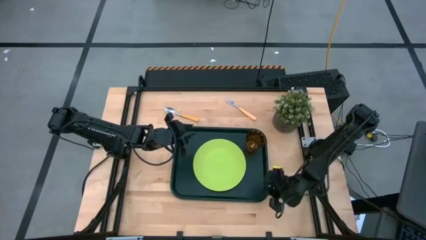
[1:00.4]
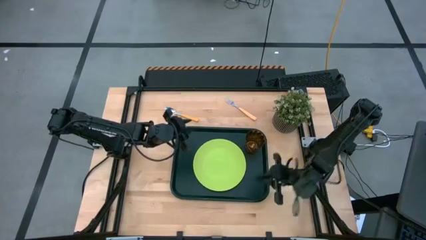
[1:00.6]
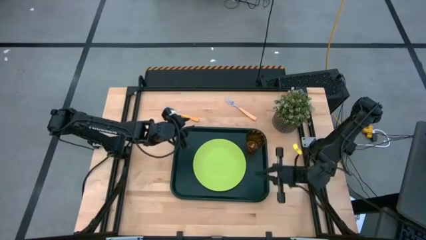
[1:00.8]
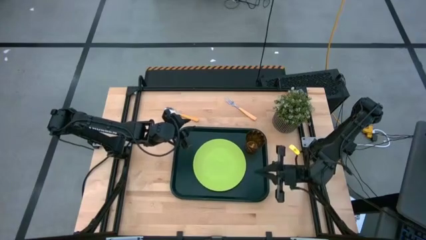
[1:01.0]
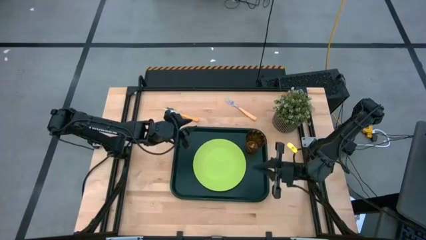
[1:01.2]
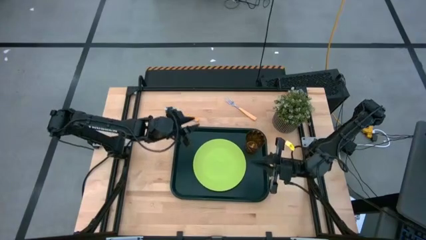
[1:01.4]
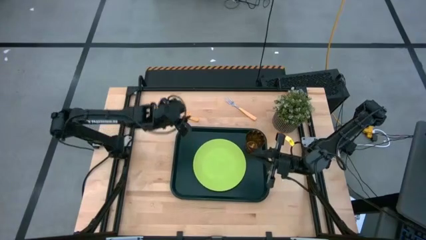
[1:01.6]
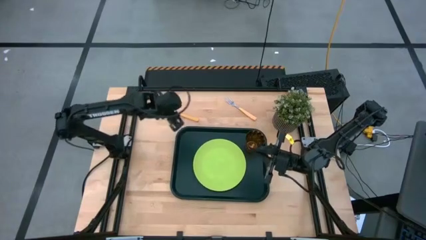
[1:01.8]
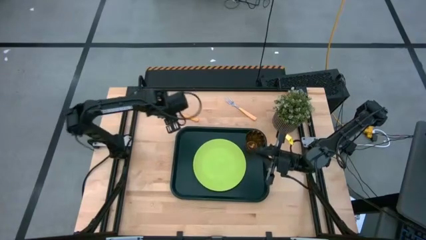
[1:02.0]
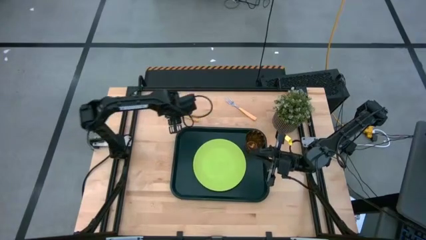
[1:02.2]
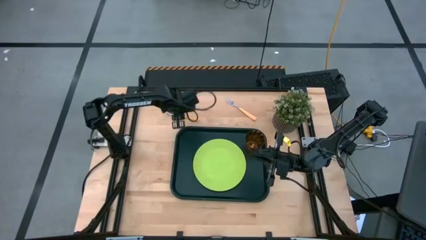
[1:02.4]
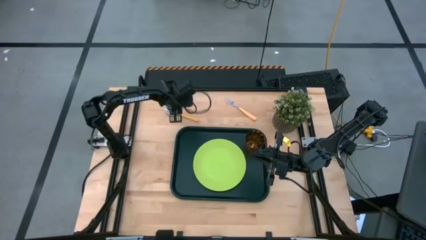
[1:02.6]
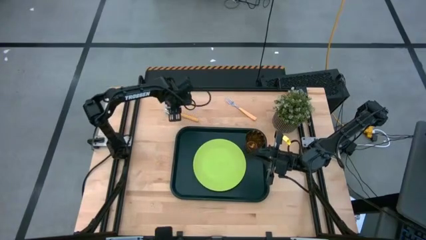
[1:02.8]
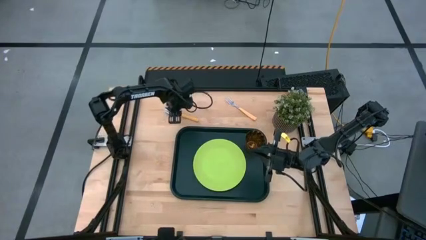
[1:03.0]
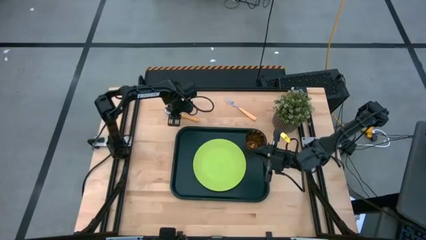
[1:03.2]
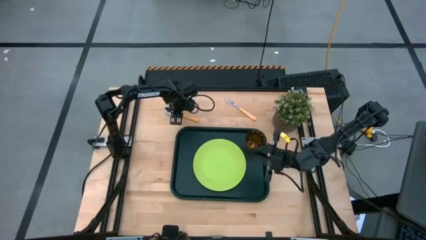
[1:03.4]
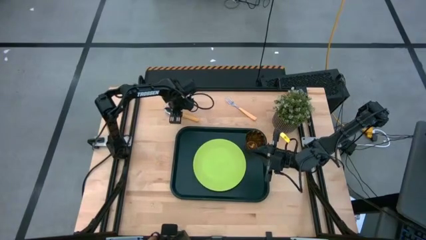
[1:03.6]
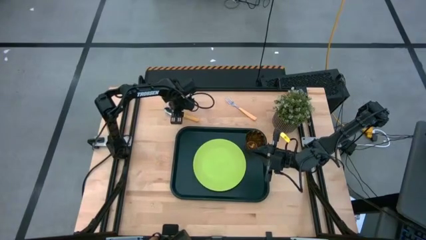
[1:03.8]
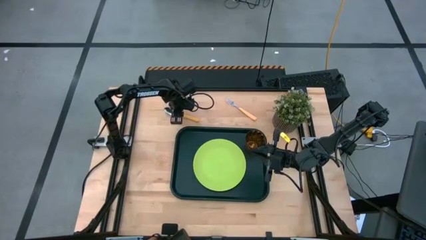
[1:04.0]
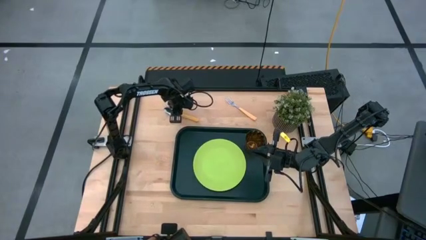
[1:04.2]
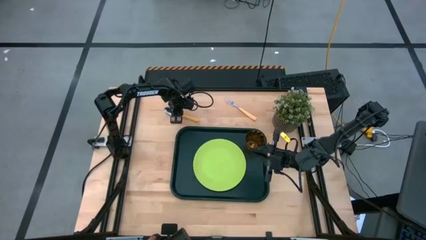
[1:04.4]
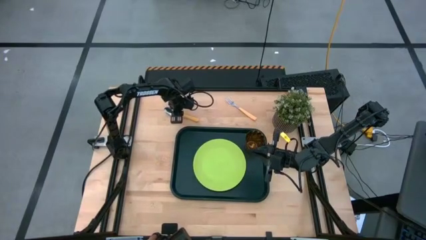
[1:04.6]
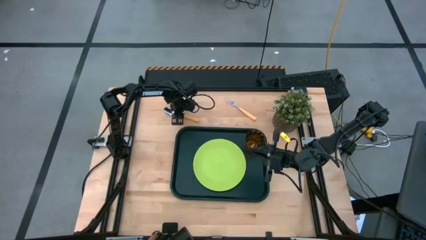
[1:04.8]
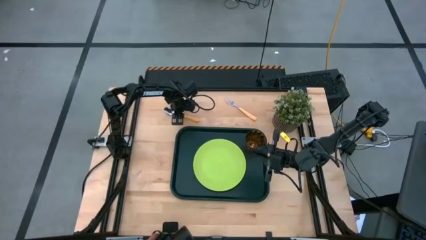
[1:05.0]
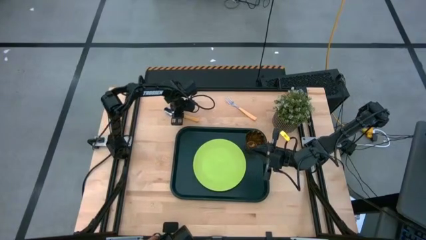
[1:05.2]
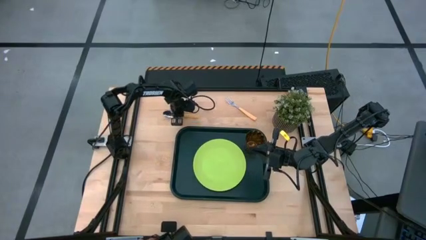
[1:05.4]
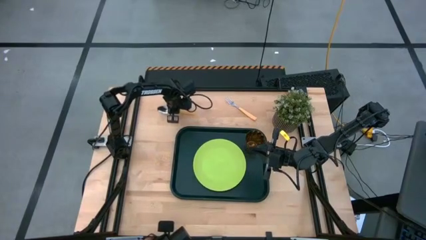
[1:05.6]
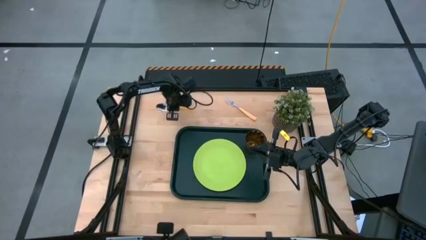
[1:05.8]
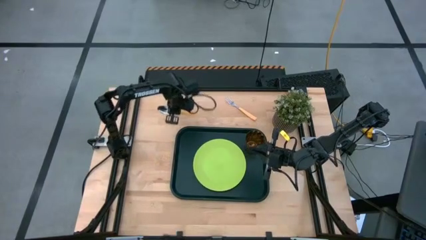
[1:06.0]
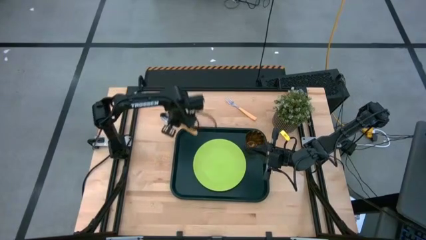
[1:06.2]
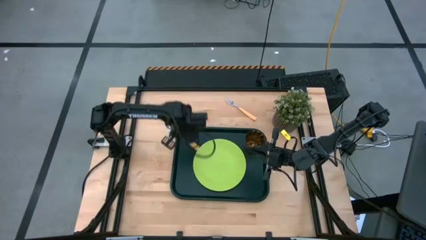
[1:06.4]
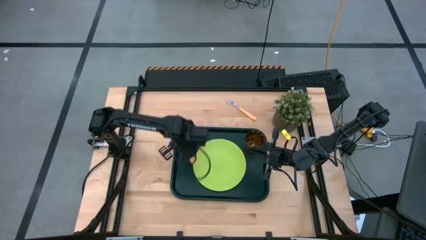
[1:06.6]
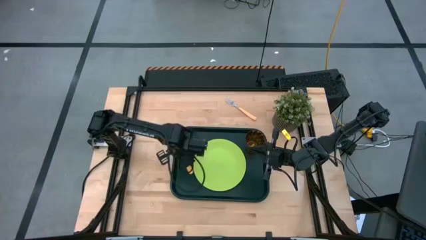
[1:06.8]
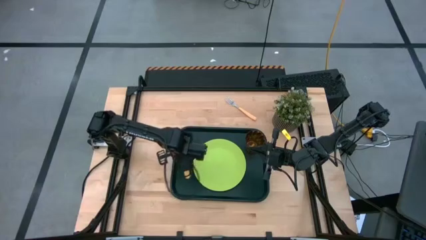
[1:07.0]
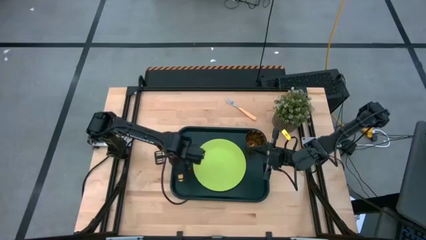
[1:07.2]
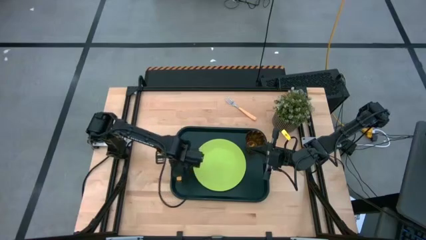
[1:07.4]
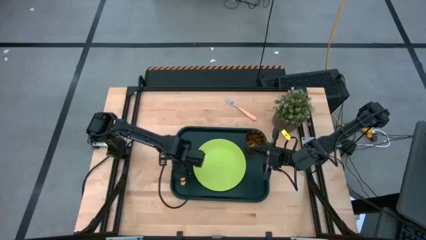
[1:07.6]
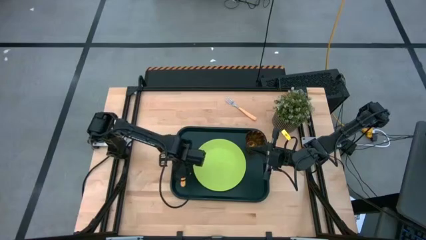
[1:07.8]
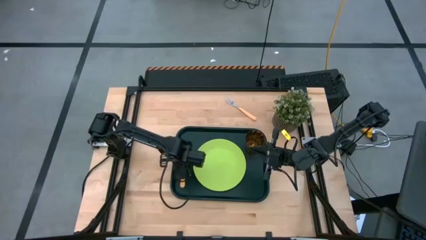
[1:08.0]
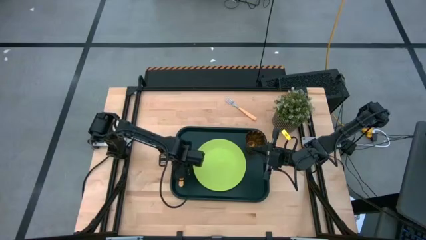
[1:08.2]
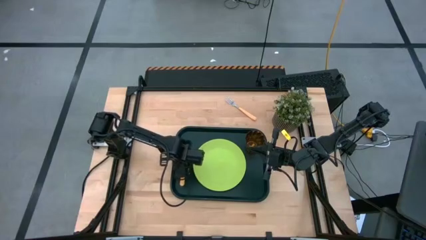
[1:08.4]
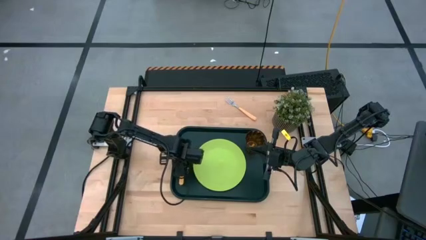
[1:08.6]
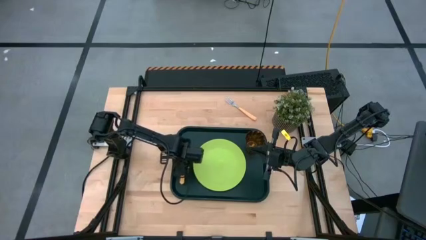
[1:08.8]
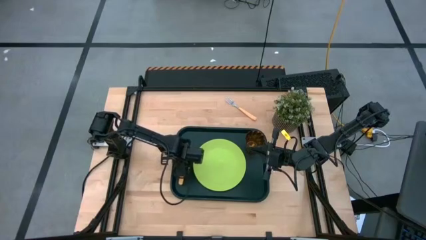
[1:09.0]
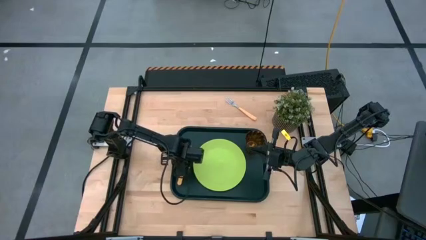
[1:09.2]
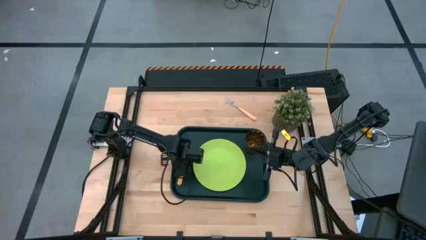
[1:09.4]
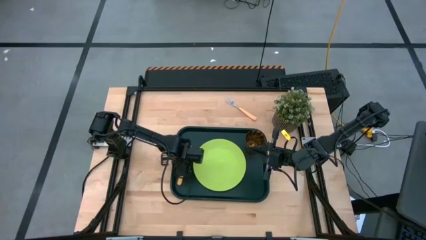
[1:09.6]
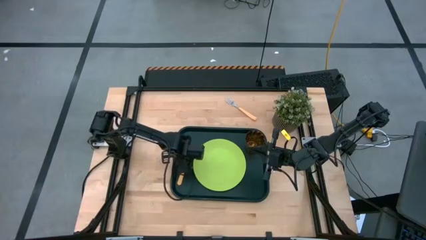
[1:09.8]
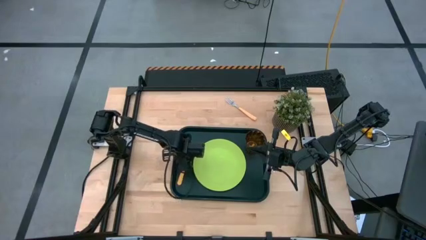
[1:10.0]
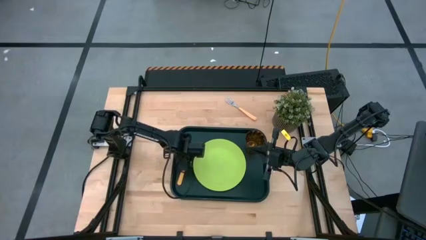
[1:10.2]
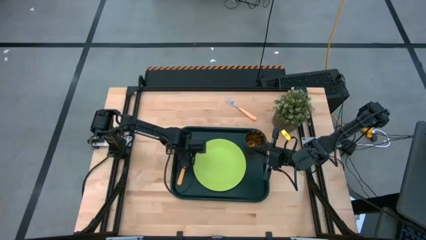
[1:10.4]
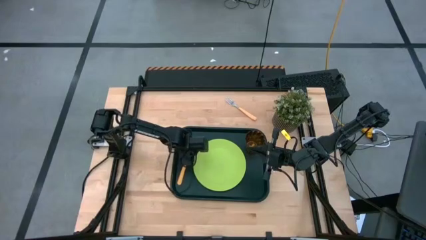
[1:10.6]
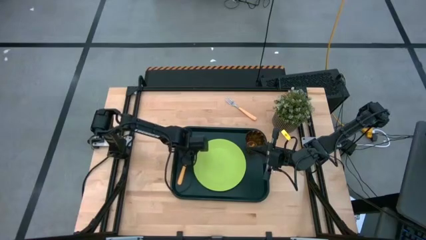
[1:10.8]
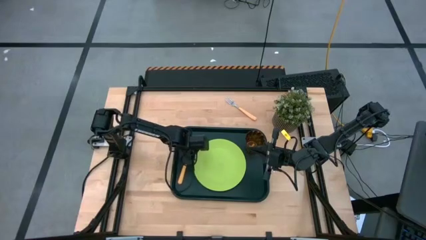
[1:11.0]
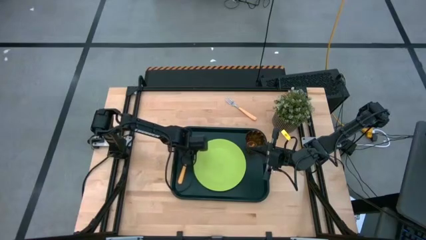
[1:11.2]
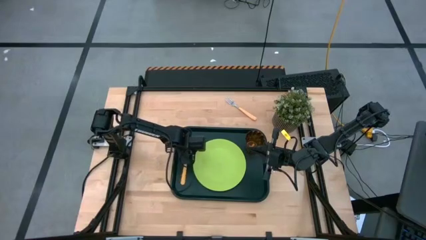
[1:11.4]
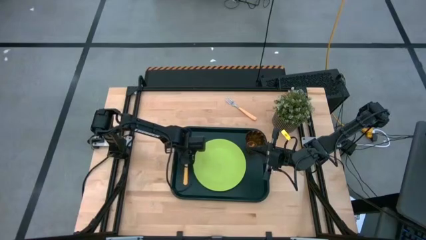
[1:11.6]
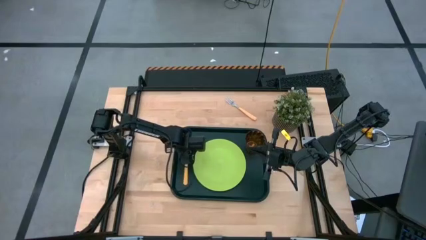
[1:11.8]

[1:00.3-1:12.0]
Task: Pick and place plate/cup/fork/spoon on tray
Put the orange spoon on the black tray to the left of the green plate

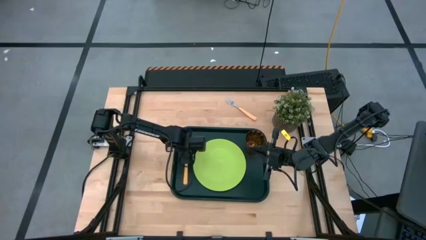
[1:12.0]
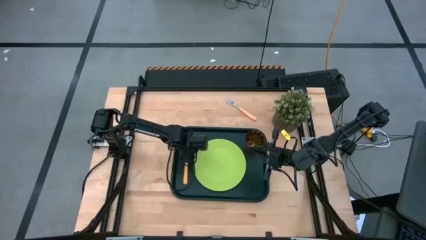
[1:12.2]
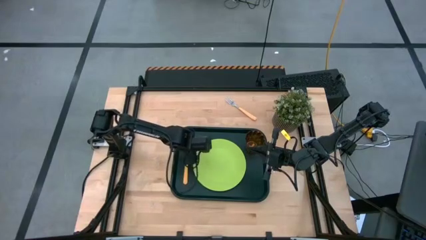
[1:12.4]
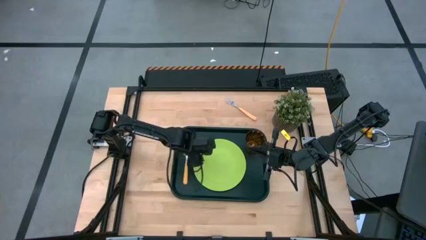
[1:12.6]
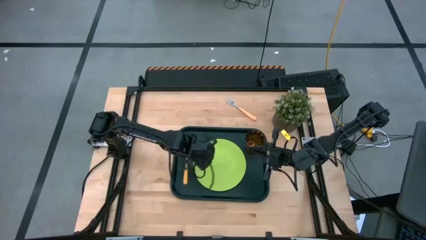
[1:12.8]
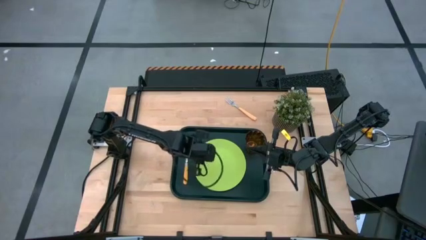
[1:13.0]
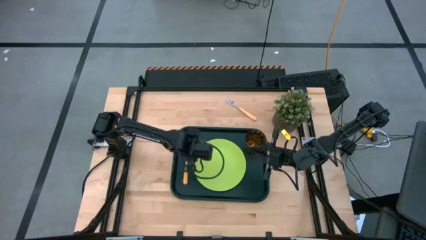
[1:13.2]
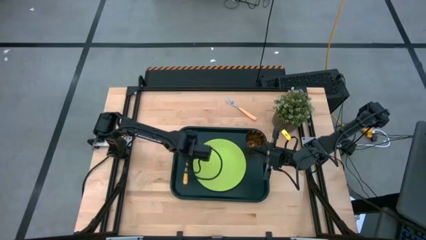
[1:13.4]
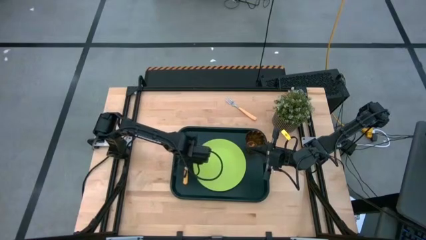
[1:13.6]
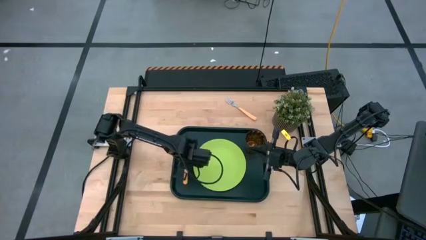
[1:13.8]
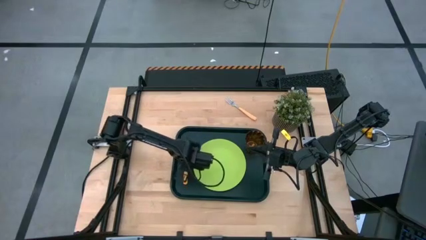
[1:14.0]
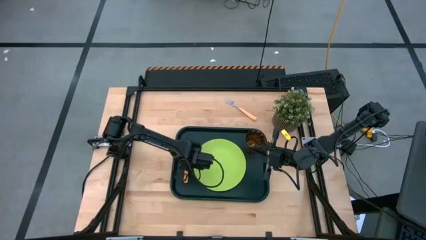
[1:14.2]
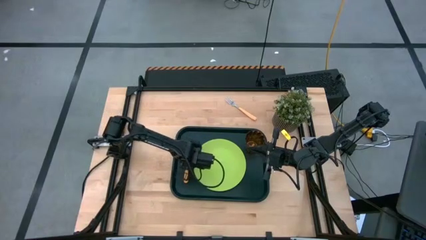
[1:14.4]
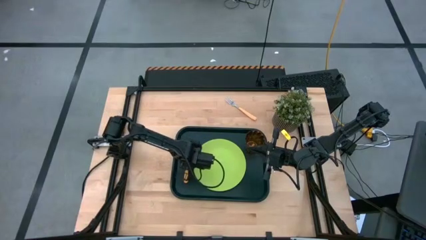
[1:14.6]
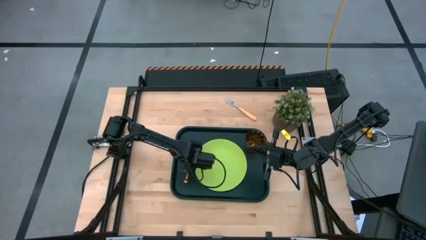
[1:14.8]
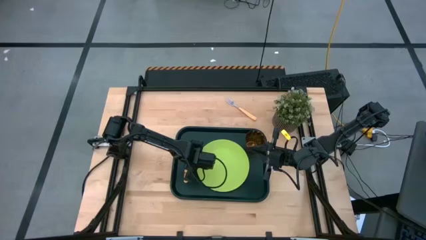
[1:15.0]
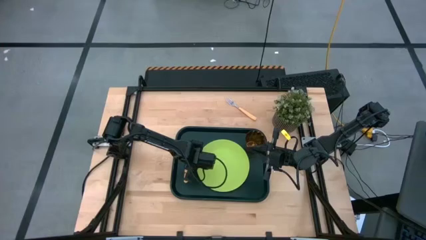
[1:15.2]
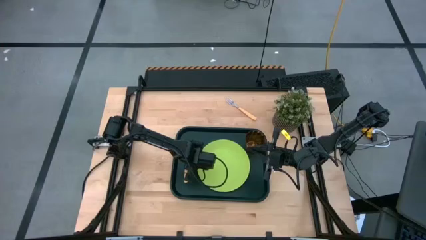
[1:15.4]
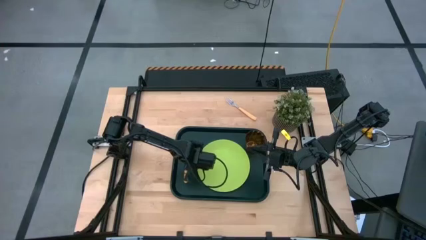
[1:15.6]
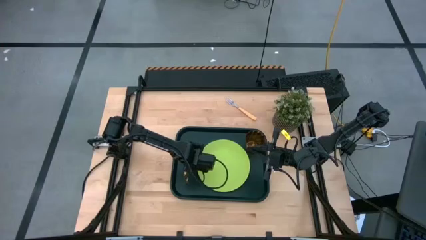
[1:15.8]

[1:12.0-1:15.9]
Adjust the green plate on the black tray

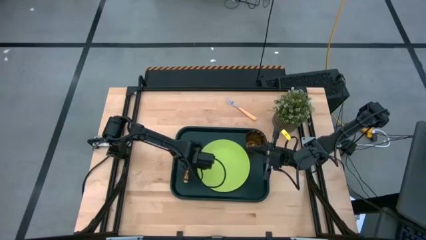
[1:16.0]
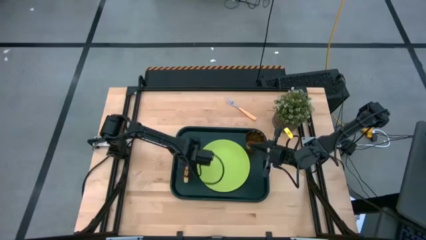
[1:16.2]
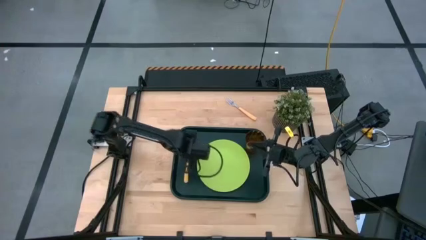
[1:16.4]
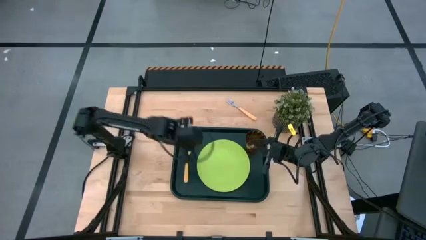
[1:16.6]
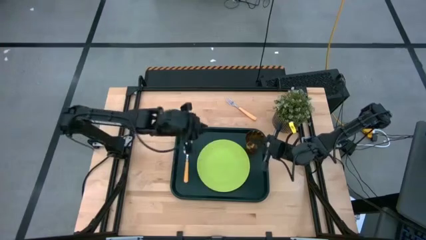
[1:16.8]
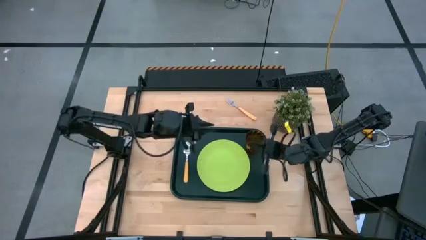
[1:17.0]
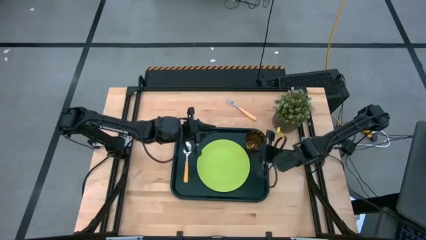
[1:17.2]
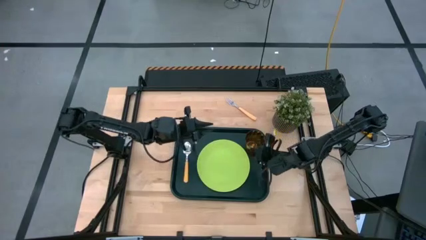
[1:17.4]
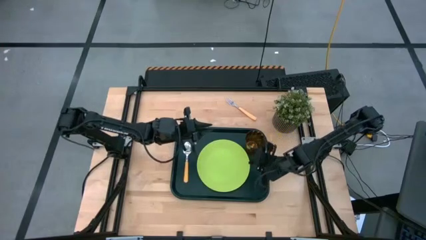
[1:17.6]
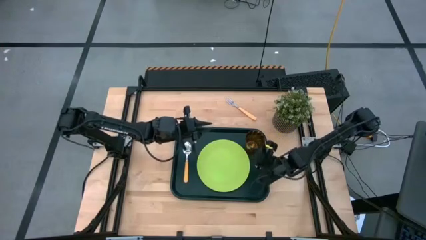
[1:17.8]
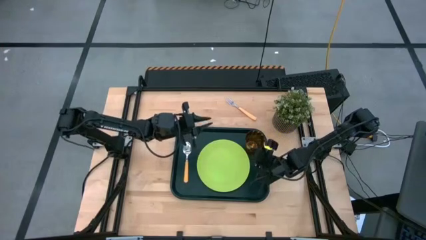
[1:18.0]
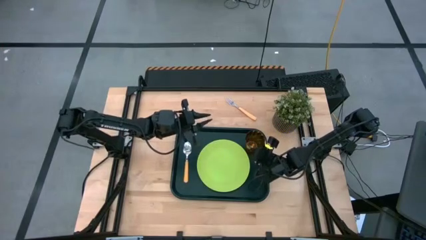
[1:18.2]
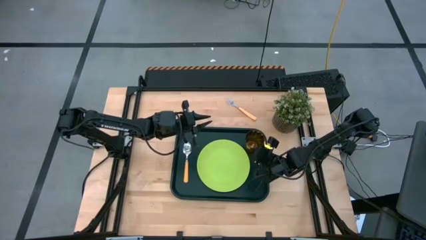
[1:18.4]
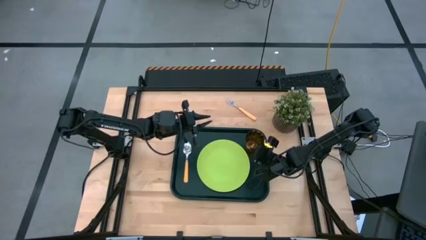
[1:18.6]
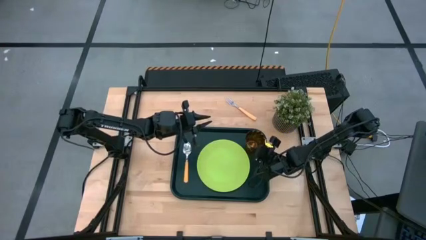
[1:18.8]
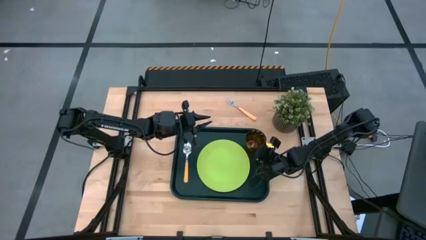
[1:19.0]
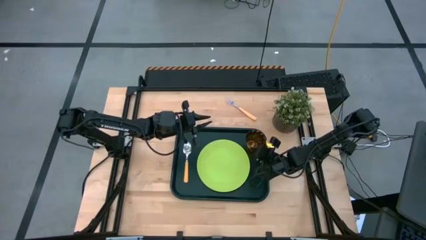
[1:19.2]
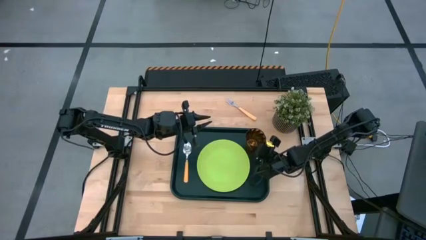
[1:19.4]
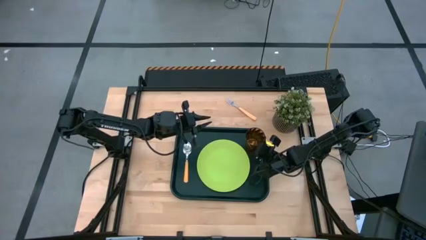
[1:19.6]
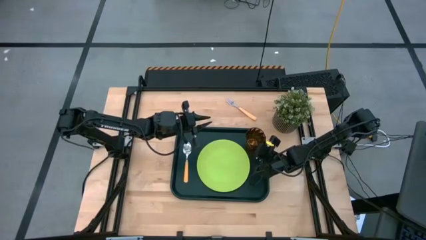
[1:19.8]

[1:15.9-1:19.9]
Adjust the brown glass cup on the black tray
